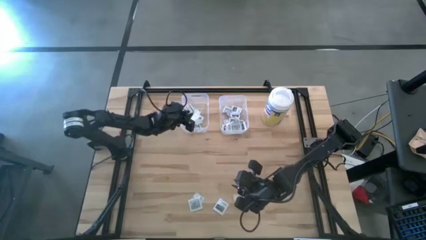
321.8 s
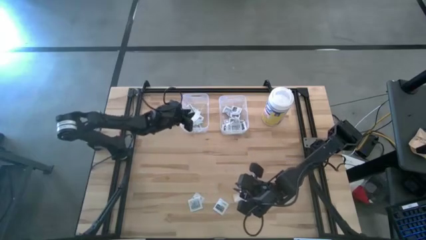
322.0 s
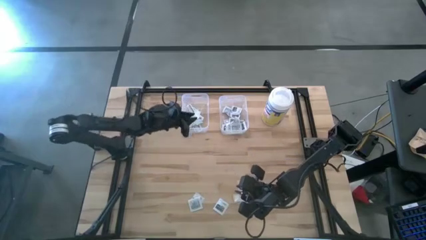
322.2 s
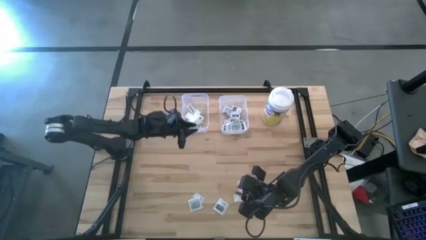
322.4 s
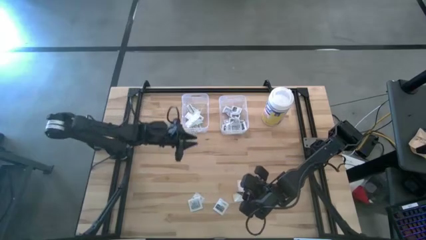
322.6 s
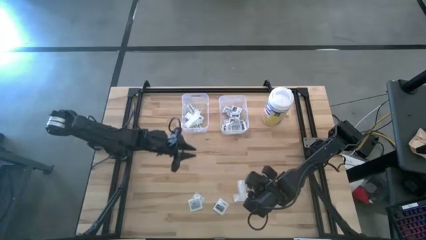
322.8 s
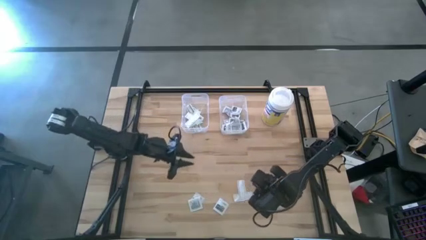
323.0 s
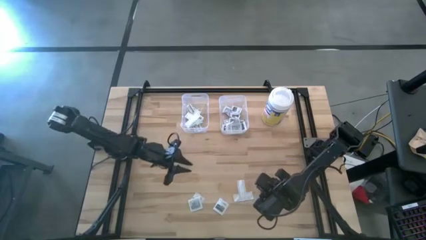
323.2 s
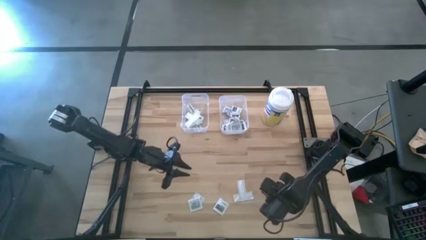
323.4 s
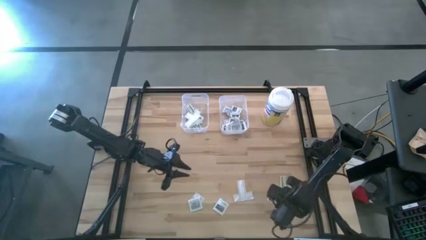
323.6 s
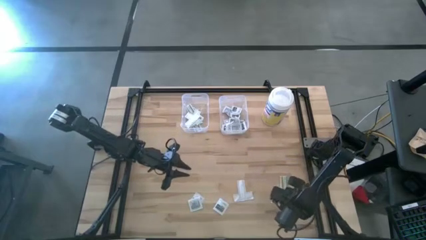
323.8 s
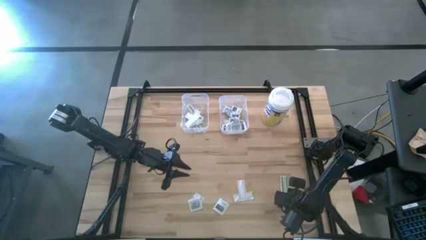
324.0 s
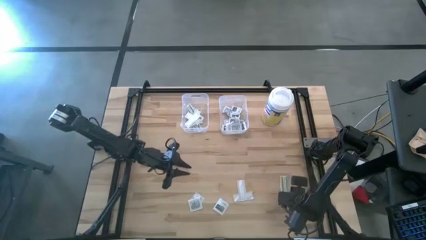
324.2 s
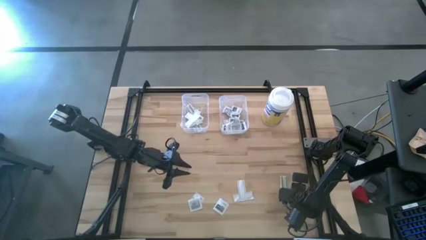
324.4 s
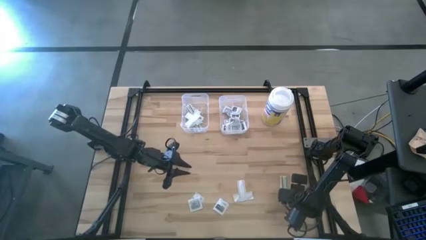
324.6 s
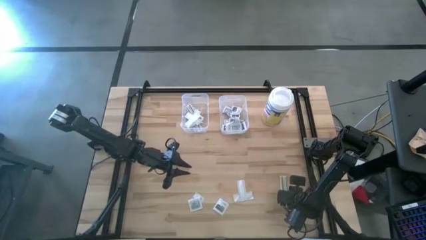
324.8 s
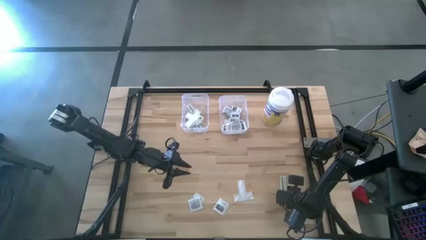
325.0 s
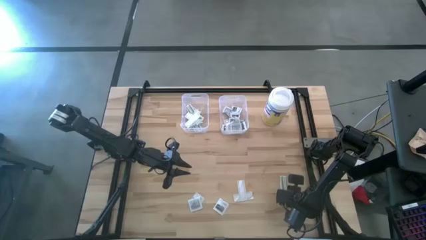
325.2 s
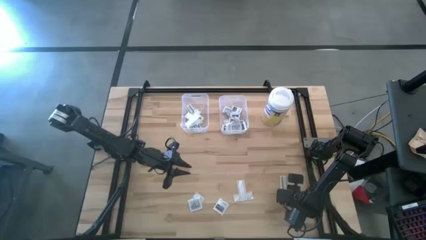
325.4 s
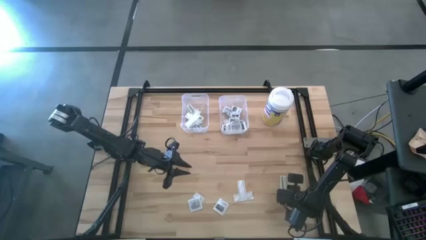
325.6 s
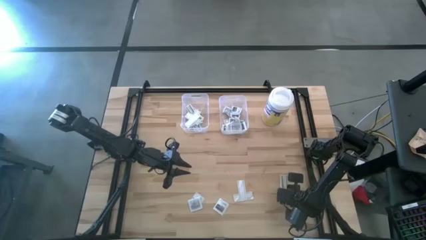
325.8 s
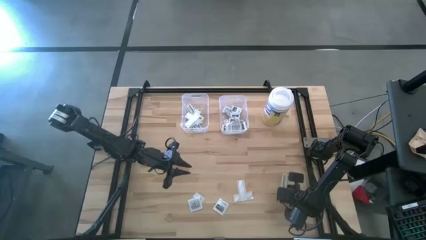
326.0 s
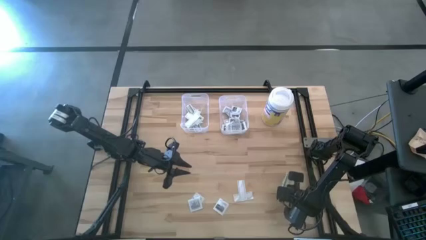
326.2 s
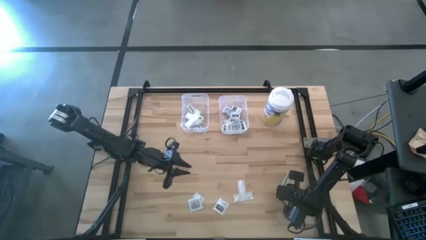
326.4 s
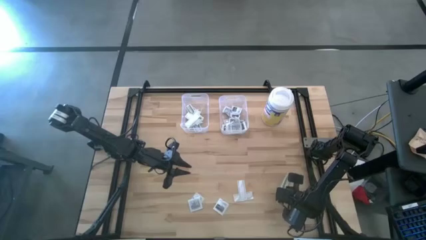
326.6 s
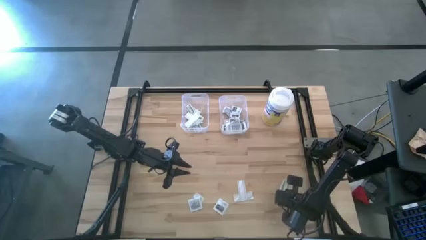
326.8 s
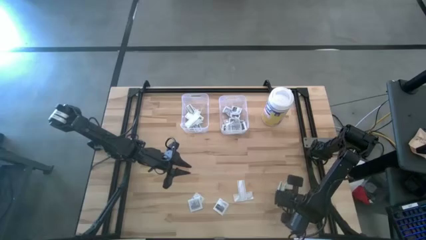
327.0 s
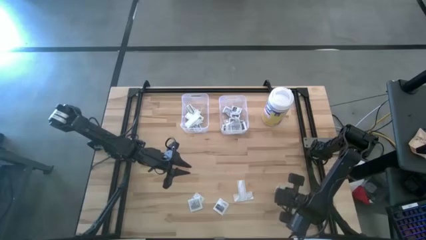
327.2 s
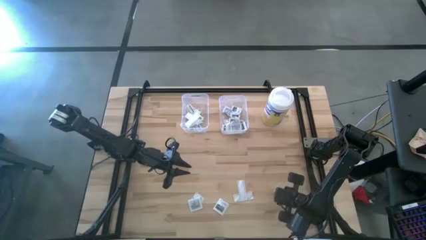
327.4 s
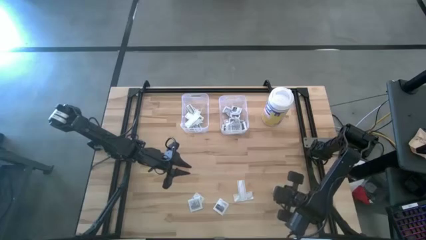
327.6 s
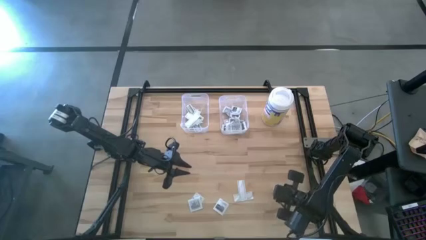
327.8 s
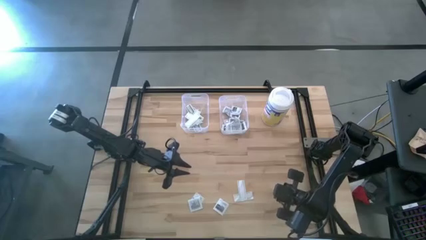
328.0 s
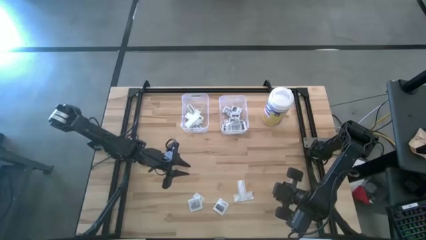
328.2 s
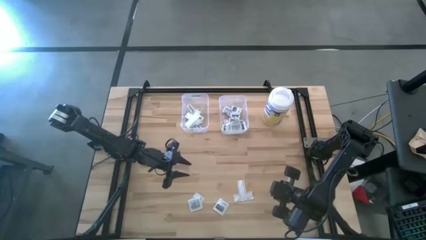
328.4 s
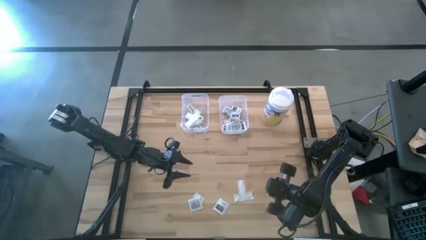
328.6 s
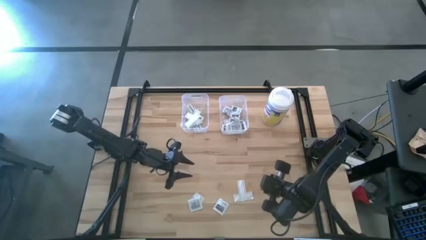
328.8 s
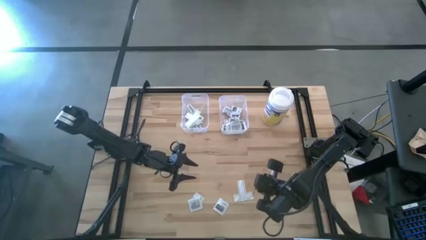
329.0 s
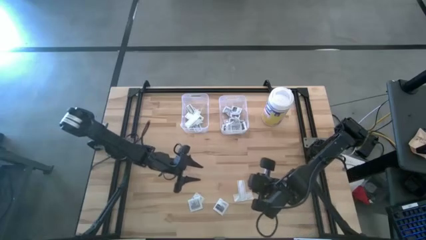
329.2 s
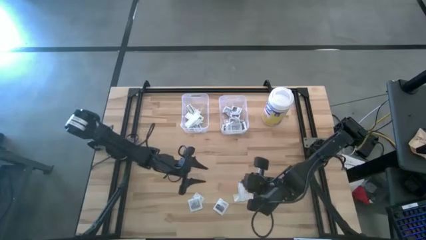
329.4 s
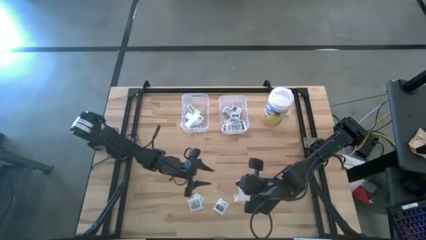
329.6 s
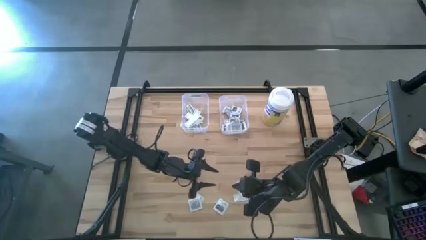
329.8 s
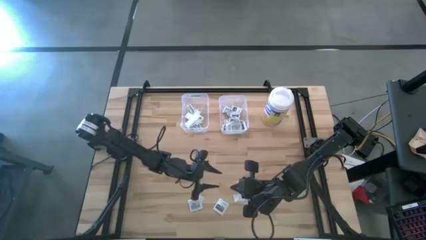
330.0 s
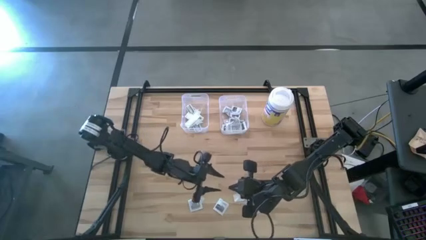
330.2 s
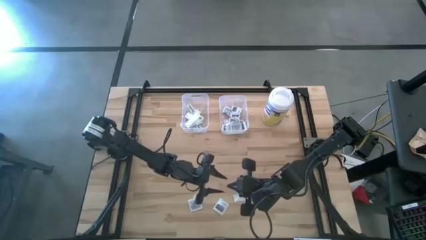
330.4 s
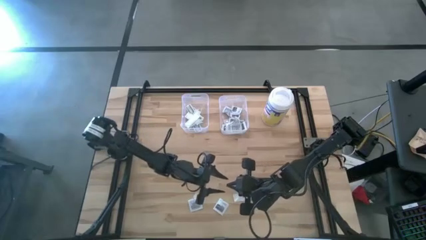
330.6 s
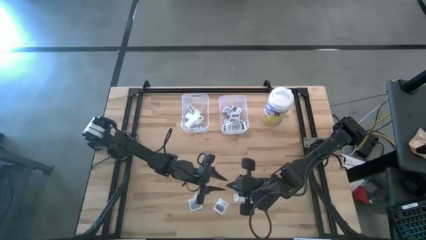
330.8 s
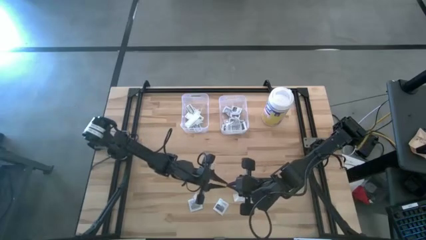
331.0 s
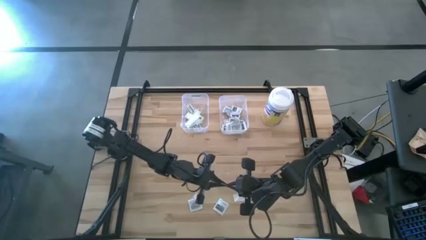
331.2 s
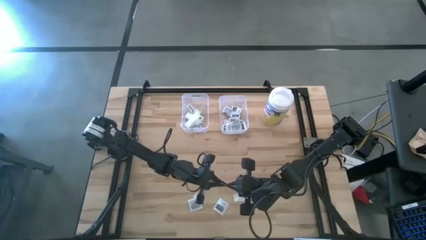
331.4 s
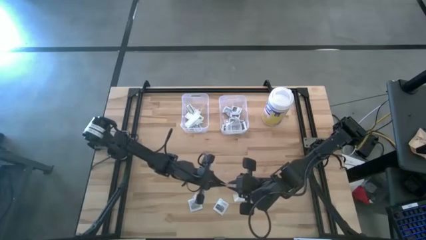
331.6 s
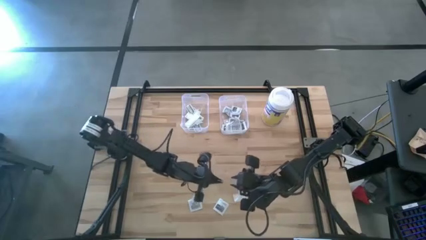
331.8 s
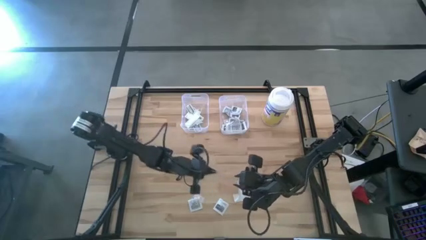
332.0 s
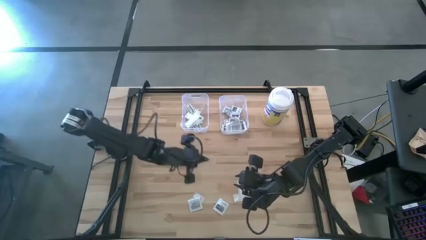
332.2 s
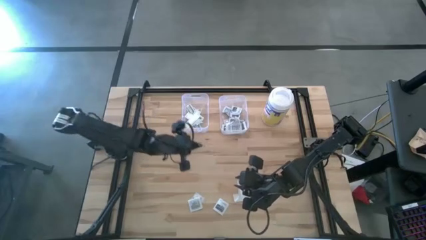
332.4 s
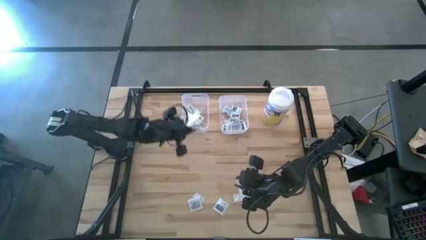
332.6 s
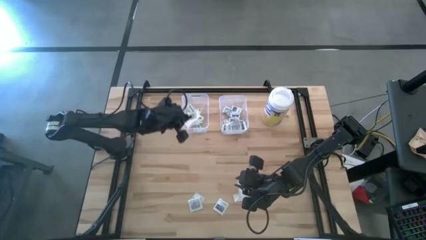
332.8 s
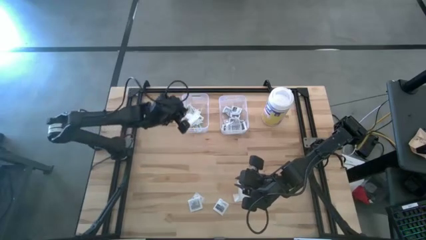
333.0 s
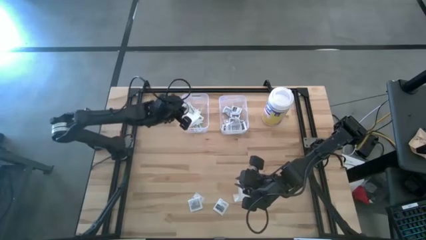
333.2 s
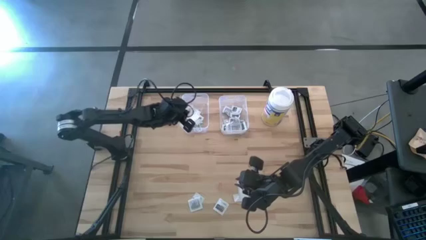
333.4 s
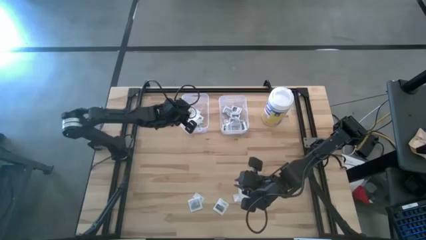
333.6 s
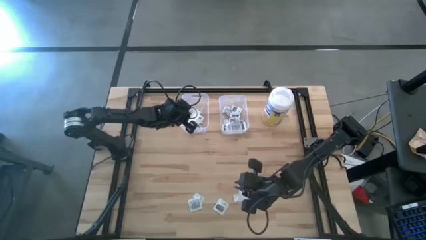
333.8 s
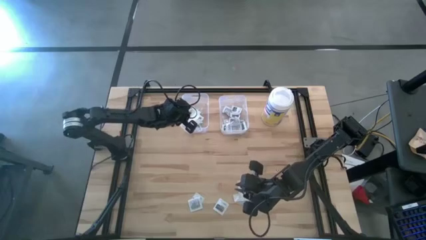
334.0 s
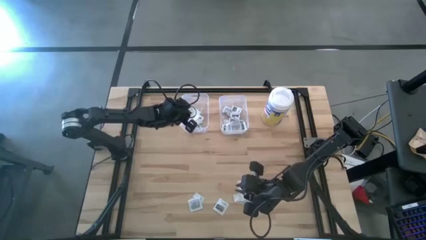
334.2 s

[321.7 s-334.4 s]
Task: Pick & Place First Aid Supplies
Put the green bandage pack into the left transparent bin

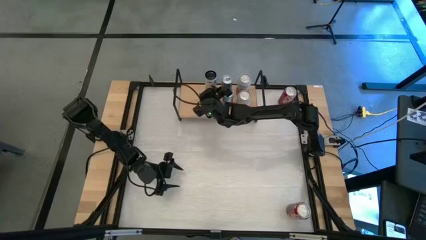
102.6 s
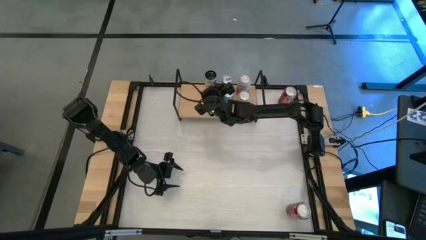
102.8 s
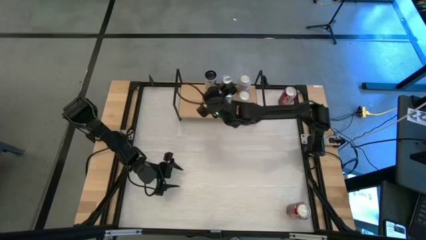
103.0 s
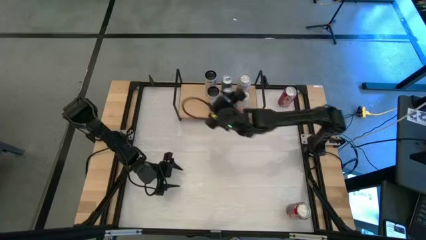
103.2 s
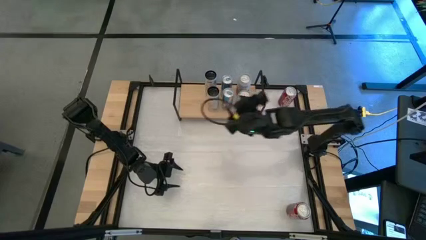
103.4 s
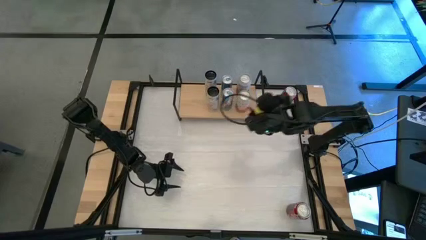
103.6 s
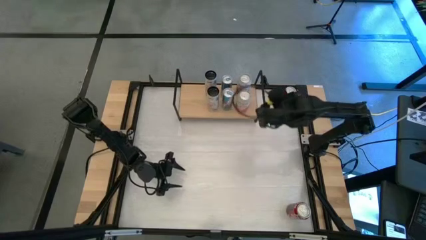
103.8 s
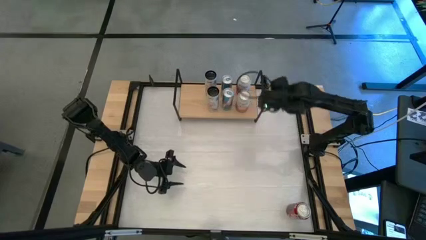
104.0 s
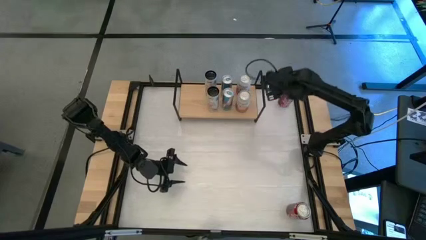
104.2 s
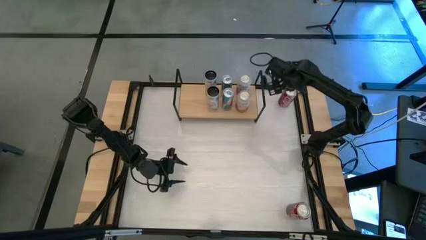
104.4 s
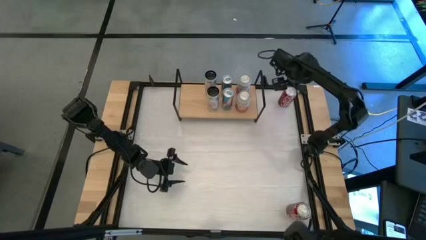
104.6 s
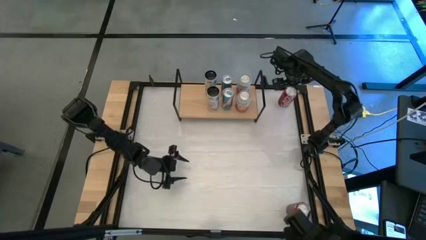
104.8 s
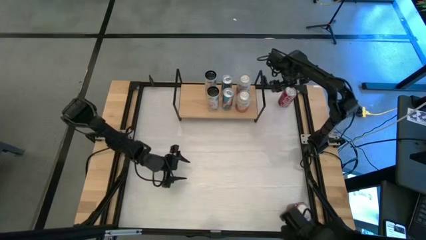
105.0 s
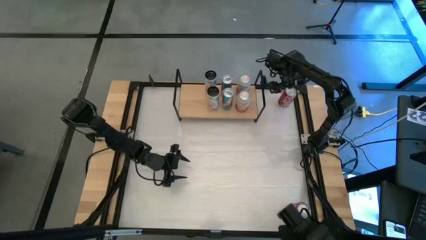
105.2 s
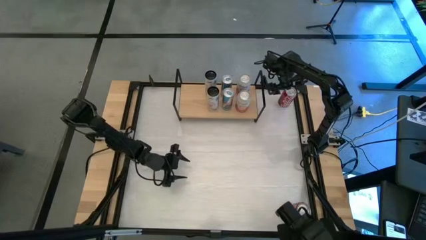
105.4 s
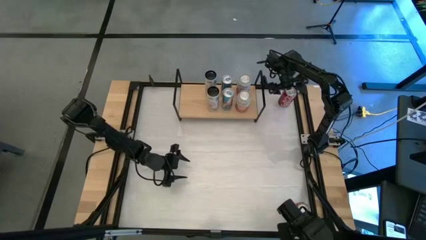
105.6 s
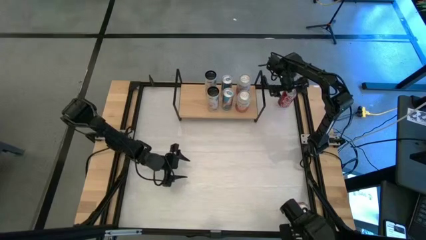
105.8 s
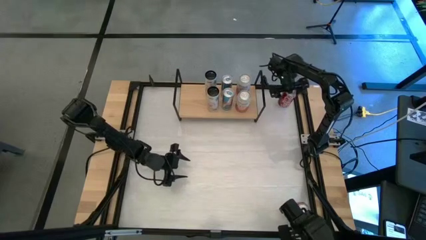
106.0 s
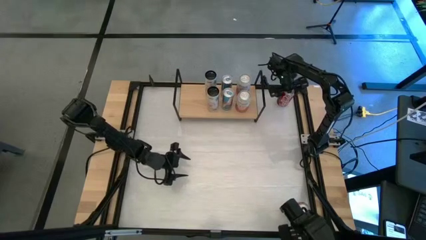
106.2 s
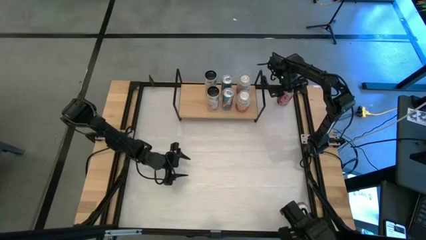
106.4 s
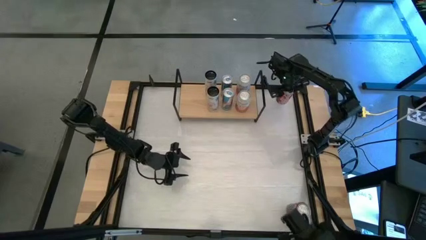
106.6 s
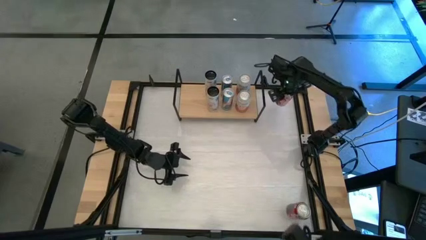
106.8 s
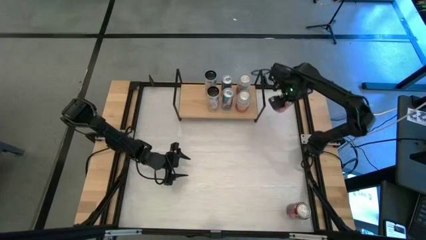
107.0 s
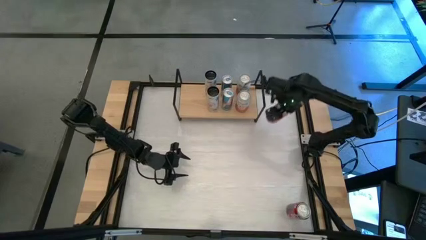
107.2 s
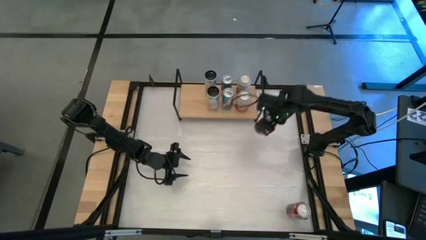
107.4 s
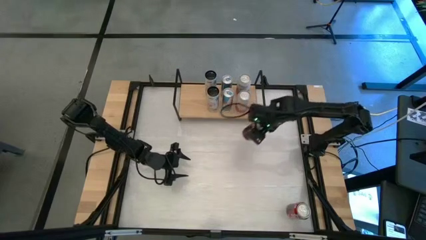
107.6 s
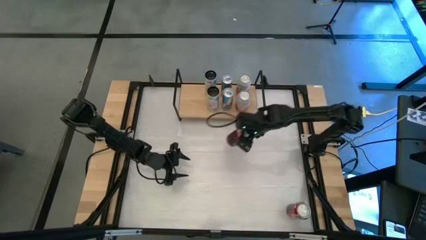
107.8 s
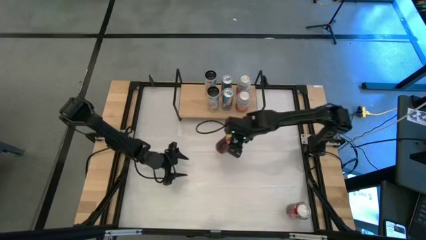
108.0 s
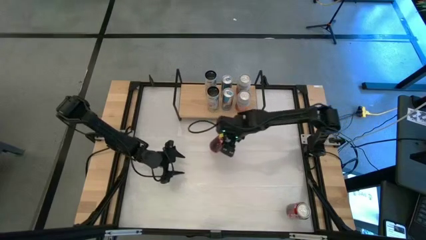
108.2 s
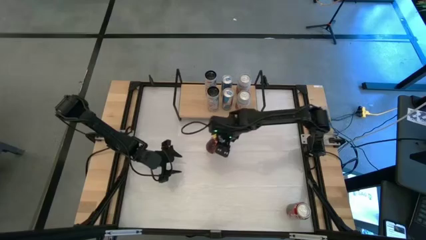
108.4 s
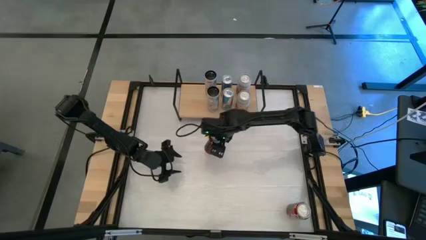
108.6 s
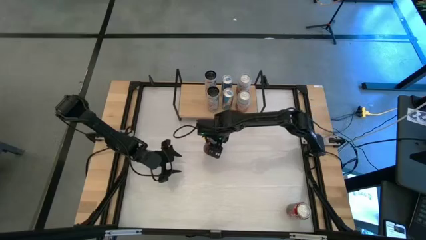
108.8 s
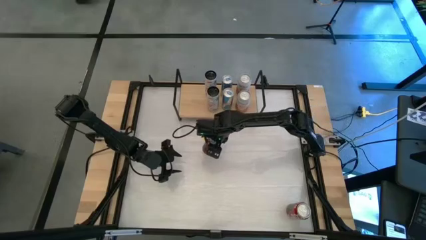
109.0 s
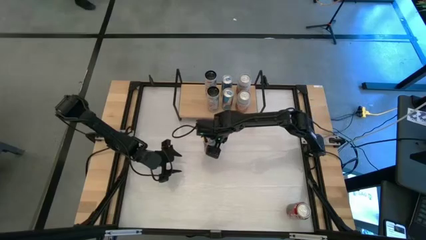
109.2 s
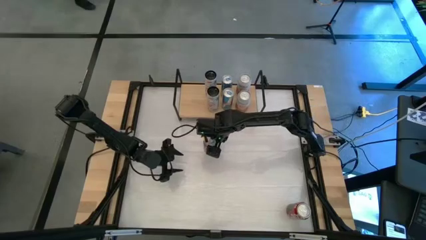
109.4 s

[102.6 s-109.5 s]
Task: Place canned beverage on shelf
Move the top red soda can to center of the table
